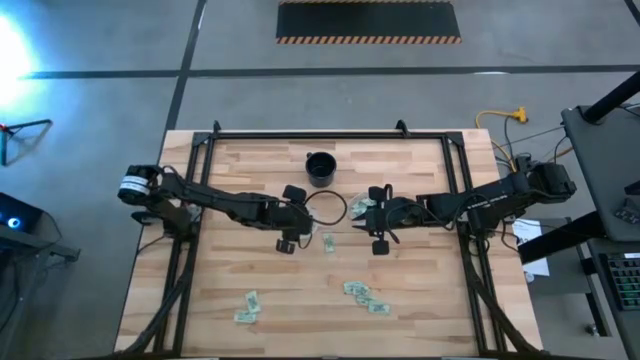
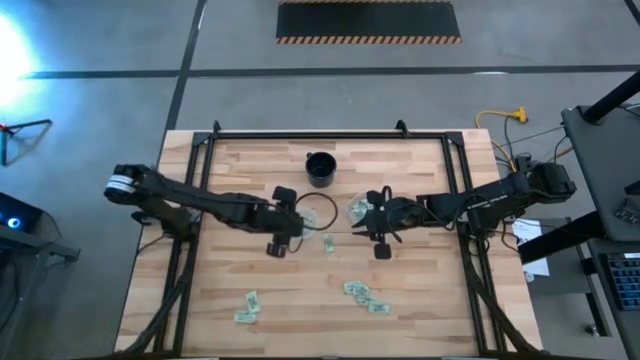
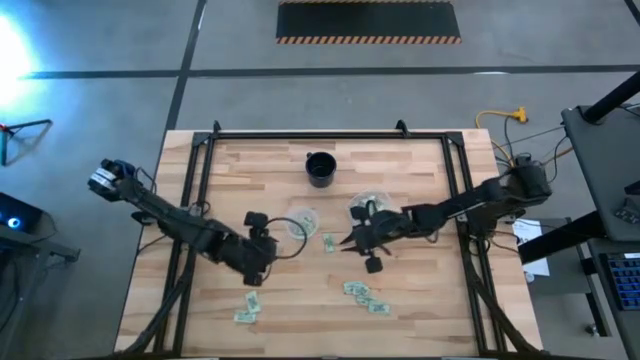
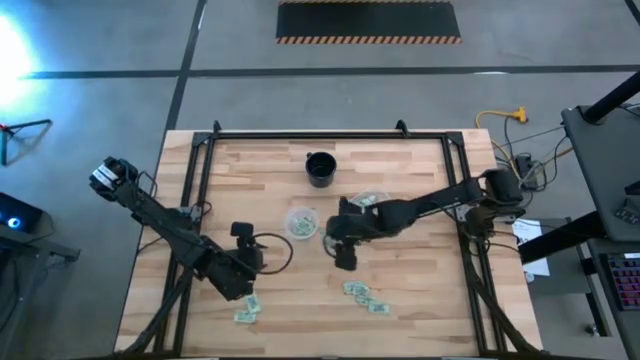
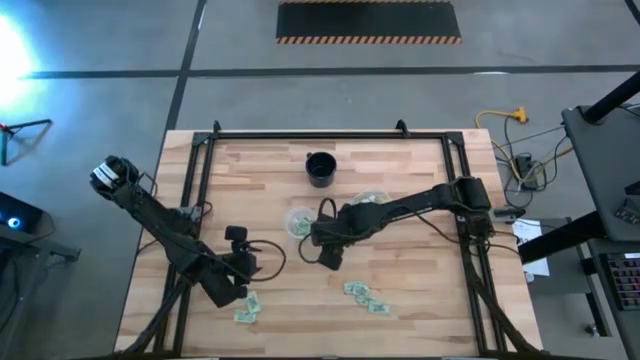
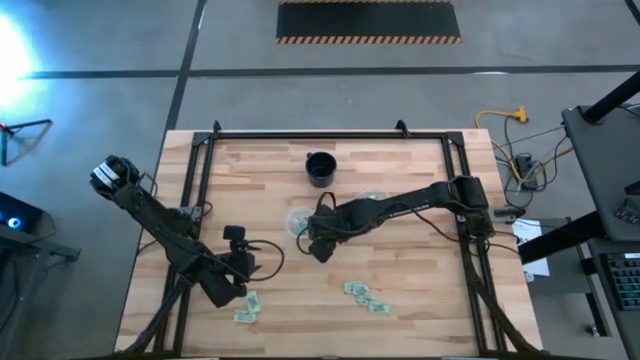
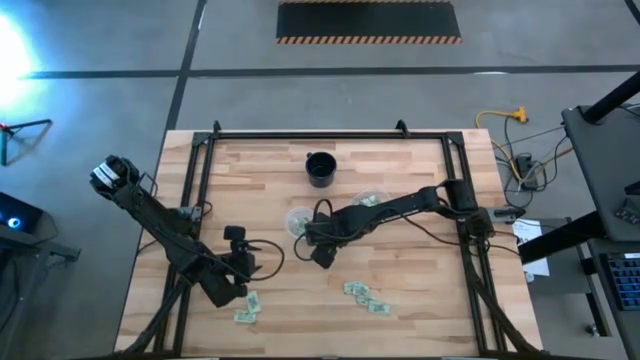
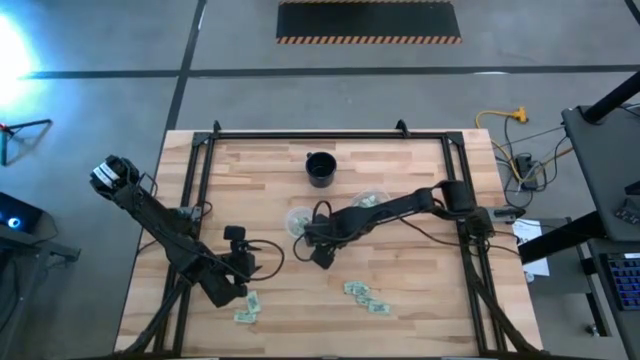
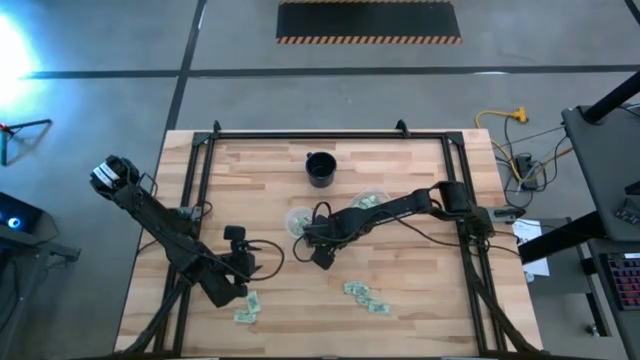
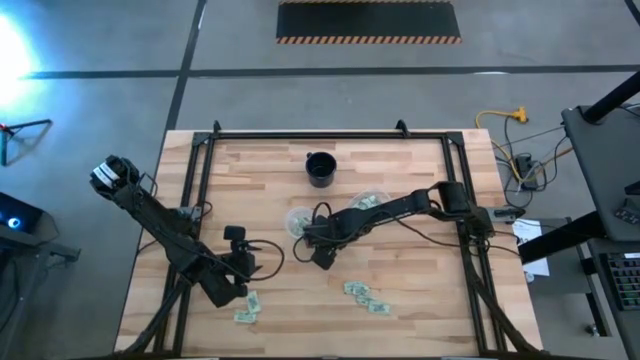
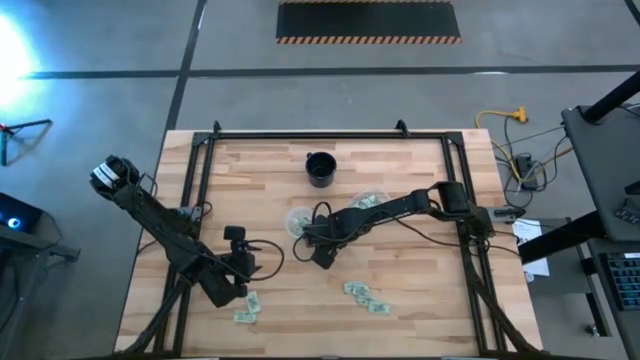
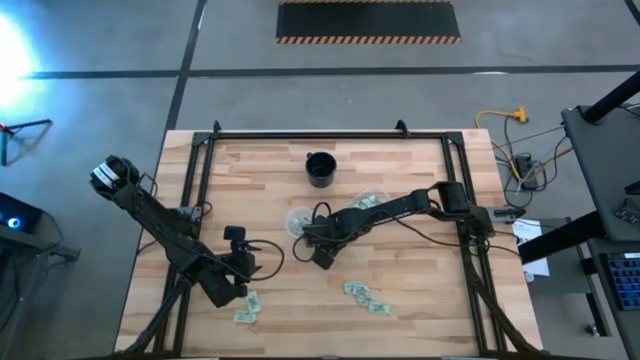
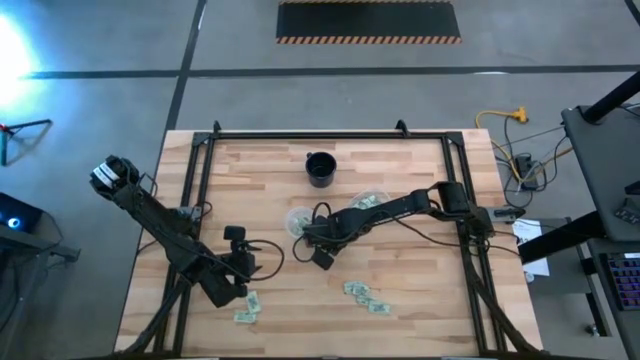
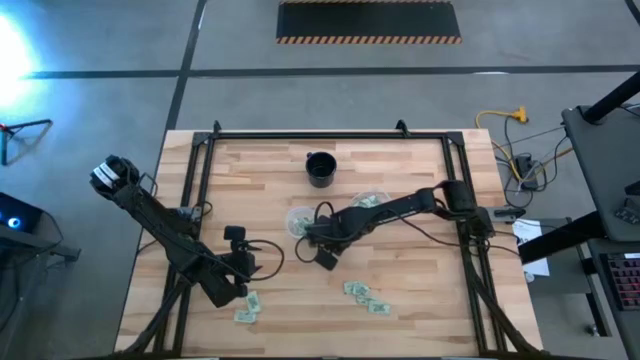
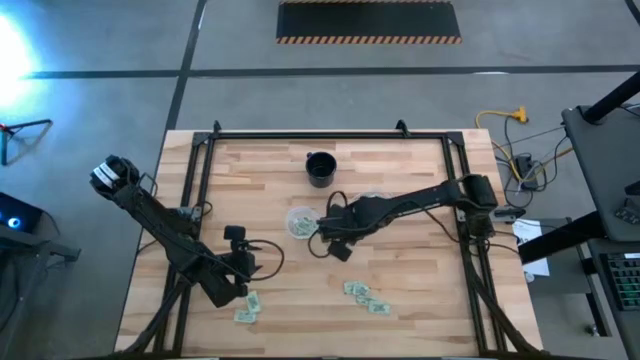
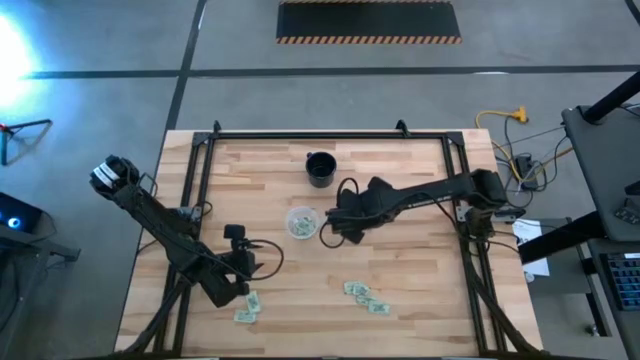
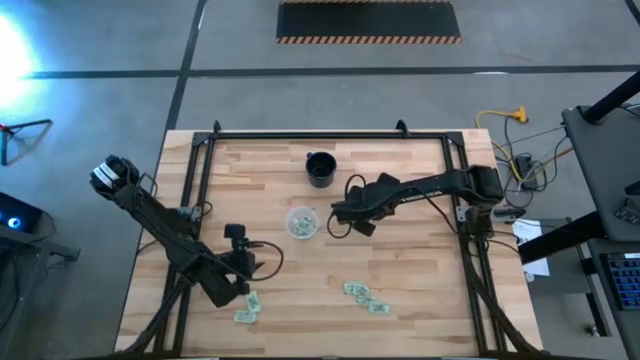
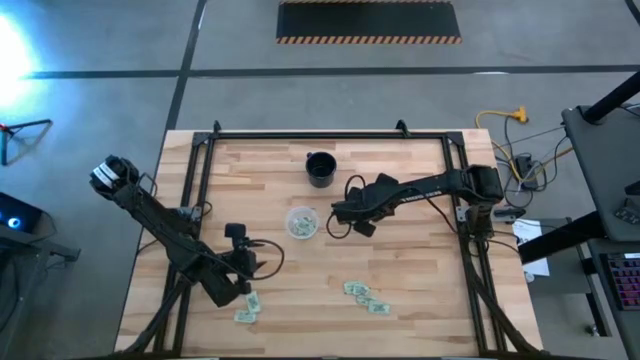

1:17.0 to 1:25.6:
Task: Pick and place Stevia / Truvia into bins
Put the green stevia packet into the right transparent container

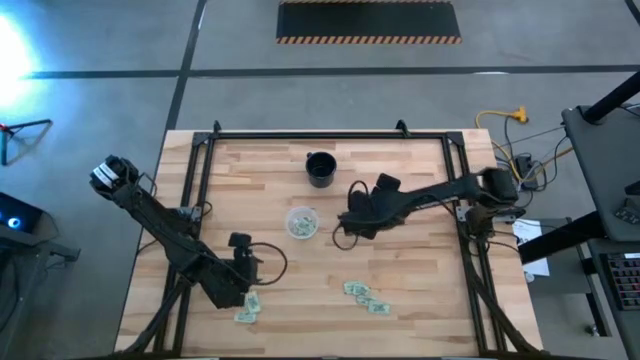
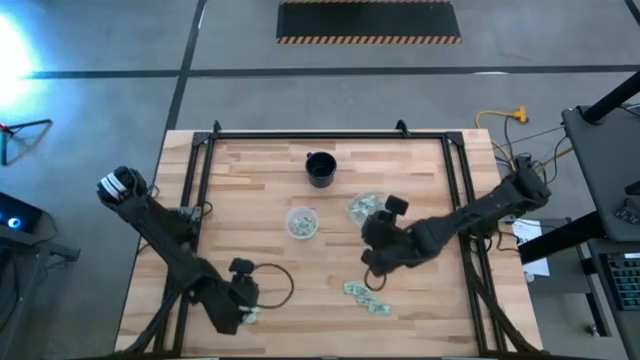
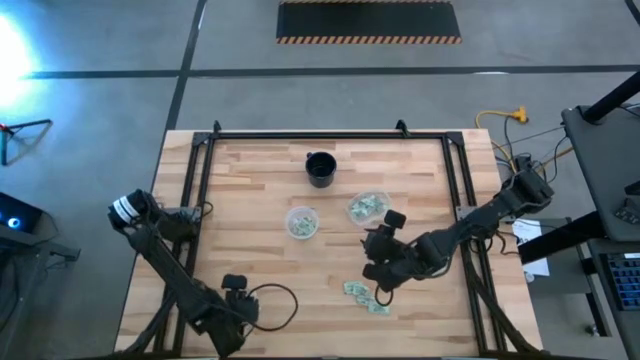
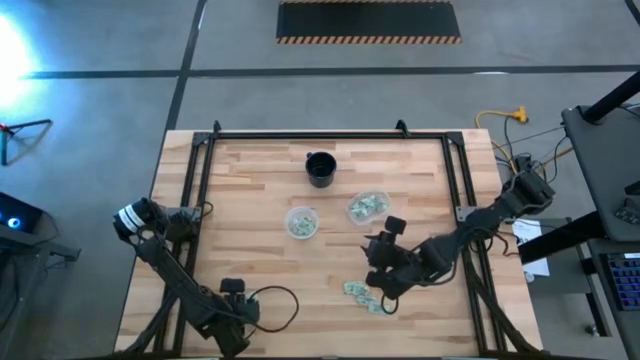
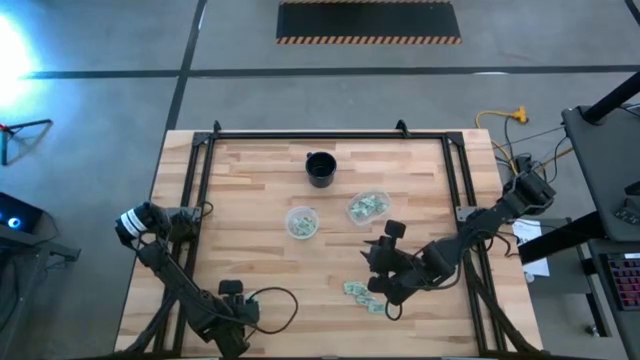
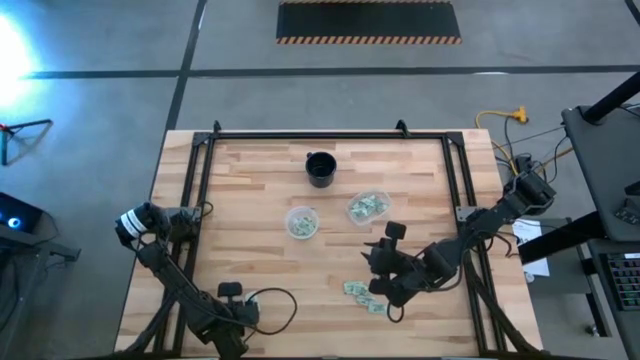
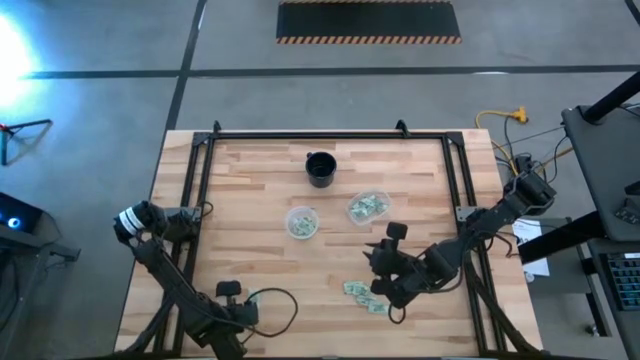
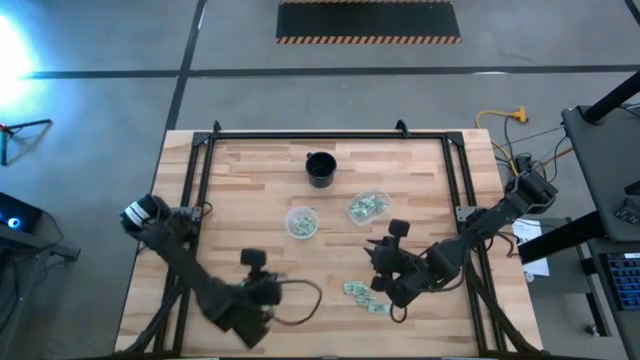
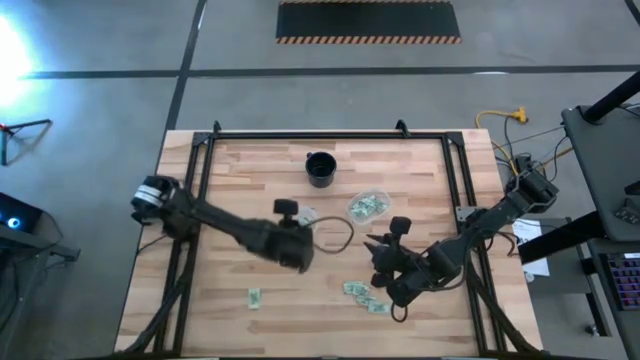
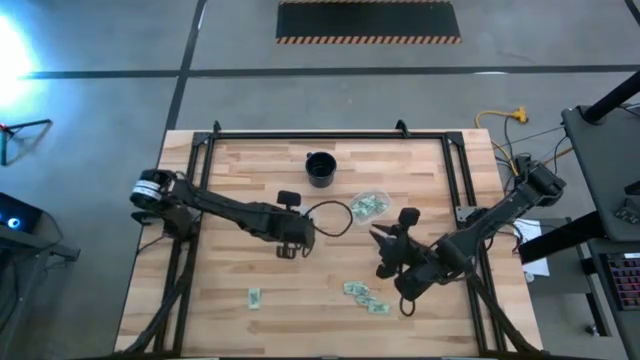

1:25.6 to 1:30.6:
Put the green stevia packet into the left transparent container

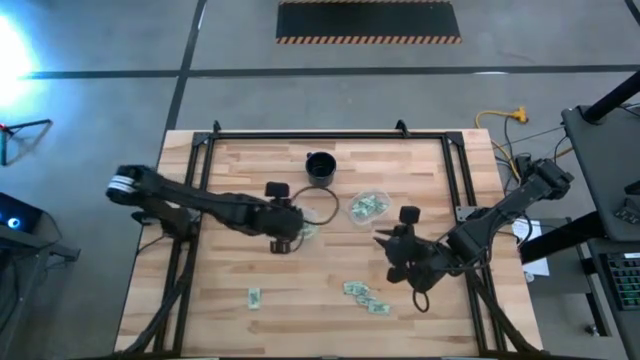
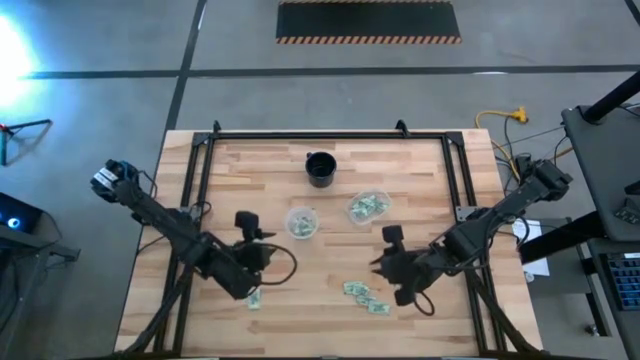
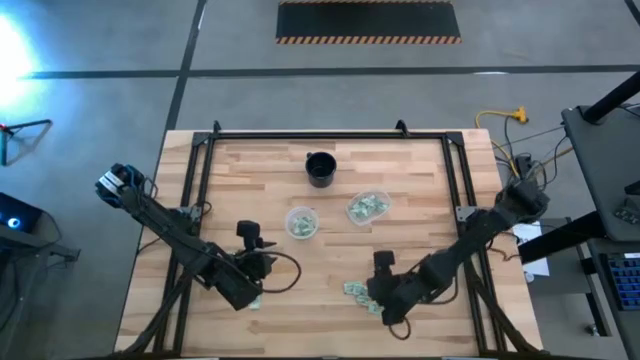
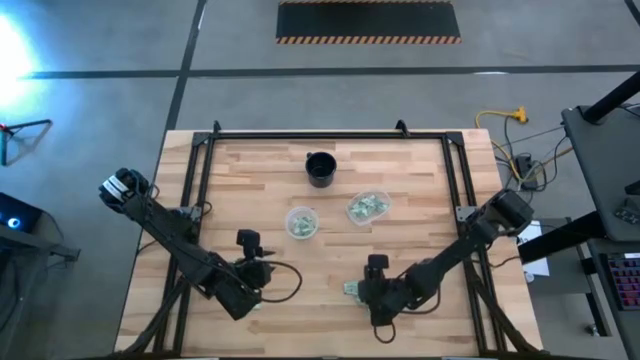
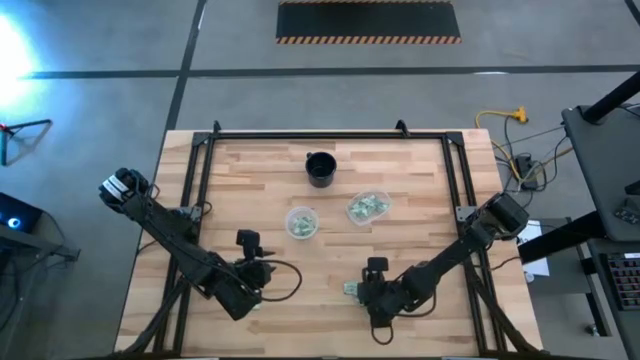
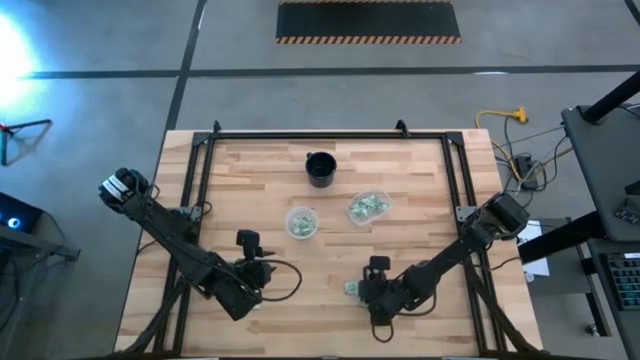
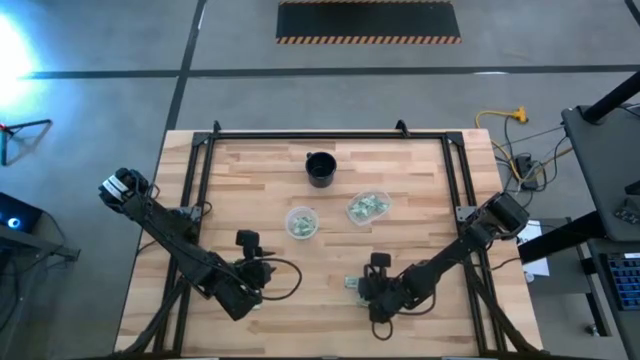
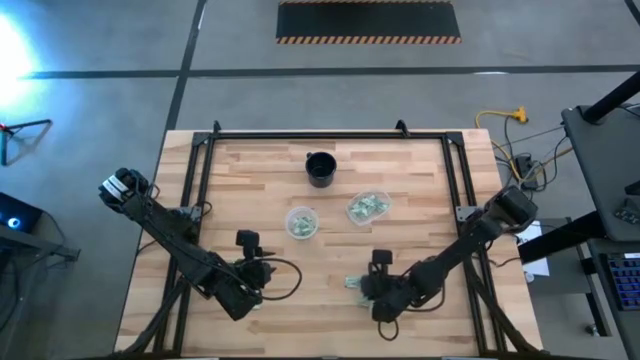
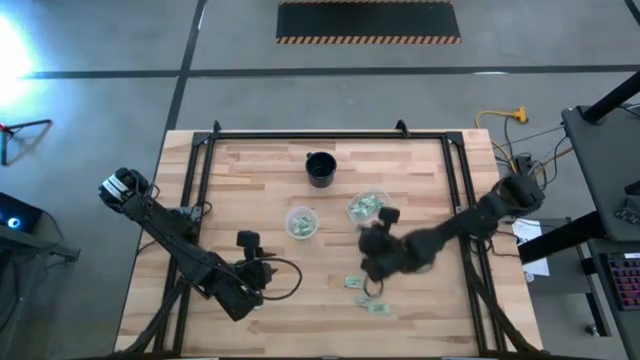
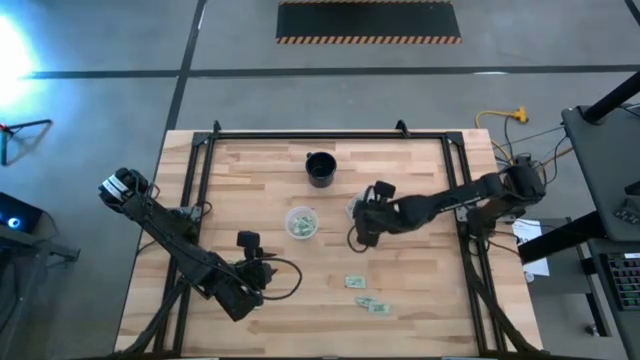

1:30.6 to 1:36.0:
Put the green stevia packet into the right transparent container

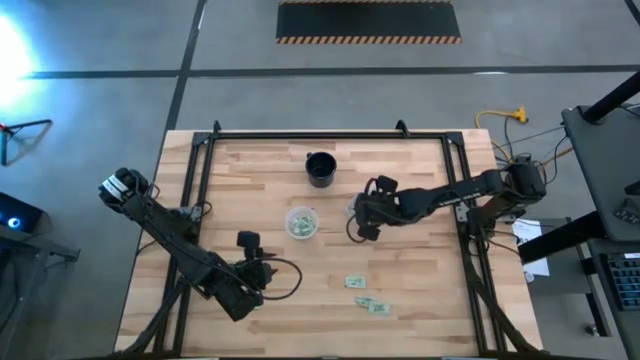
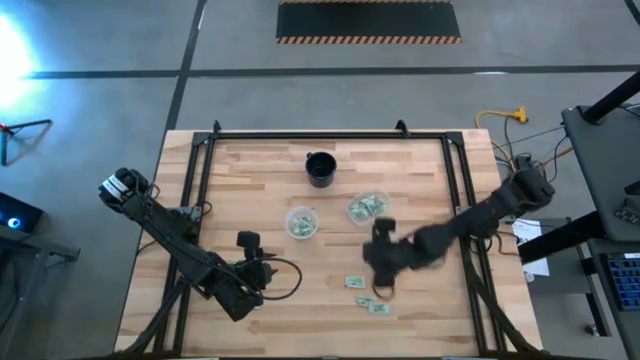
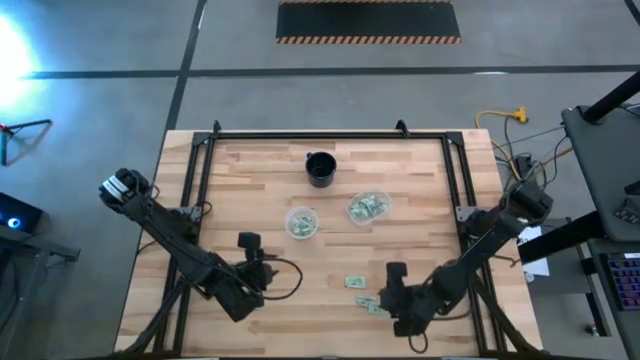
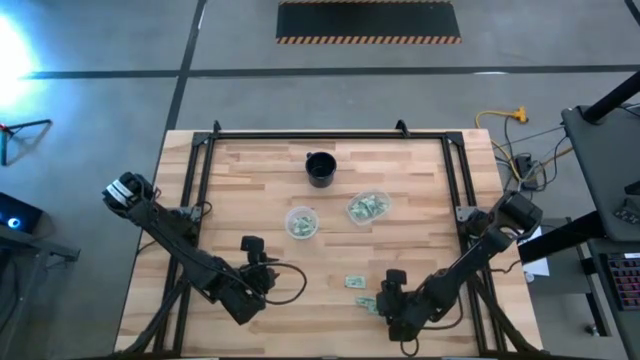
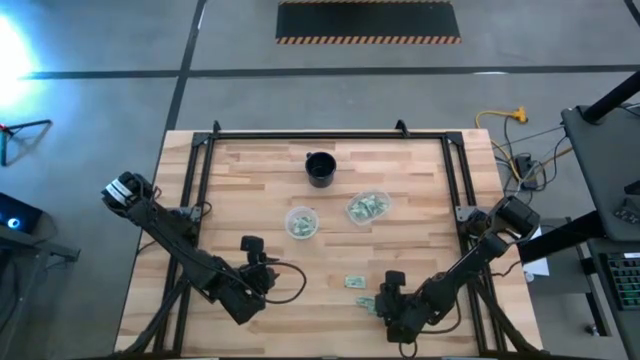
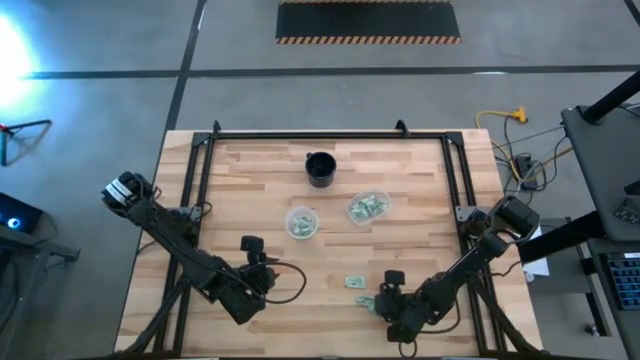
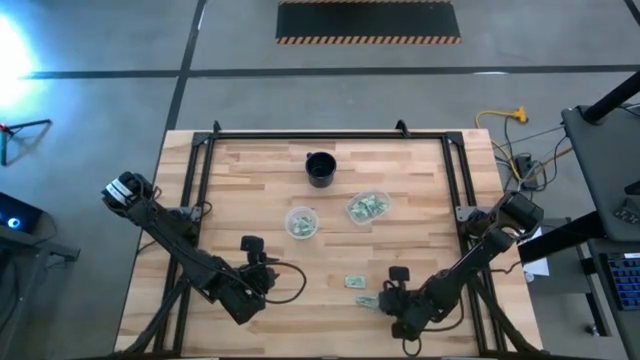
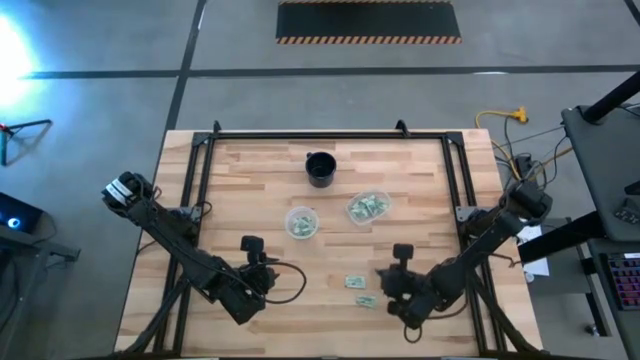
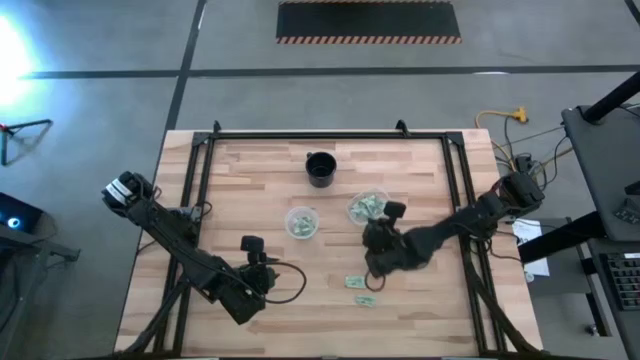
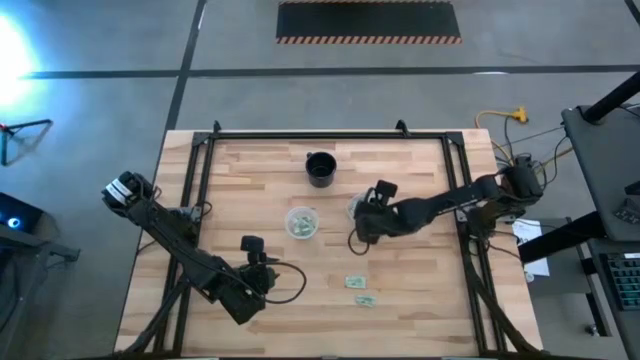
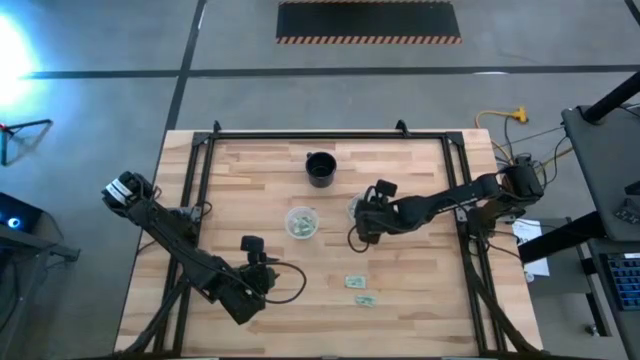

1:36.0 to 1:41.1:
Put the green stevia packet into the right transparent container
